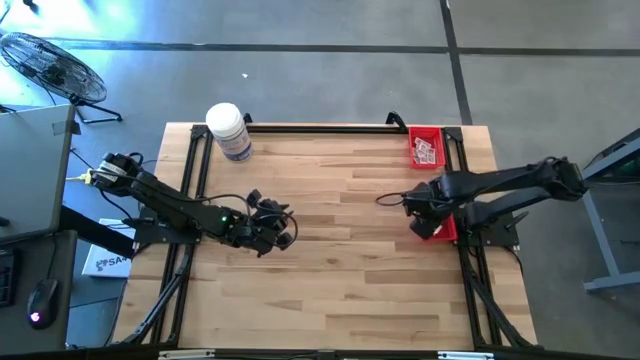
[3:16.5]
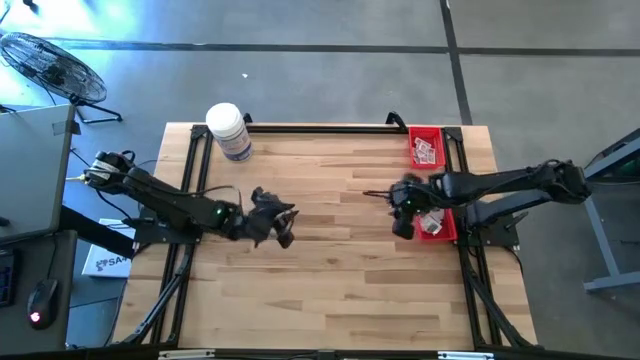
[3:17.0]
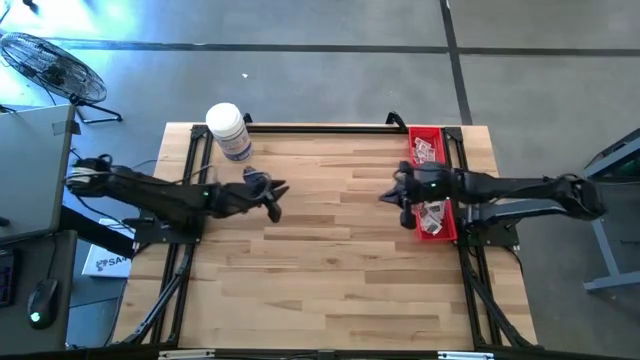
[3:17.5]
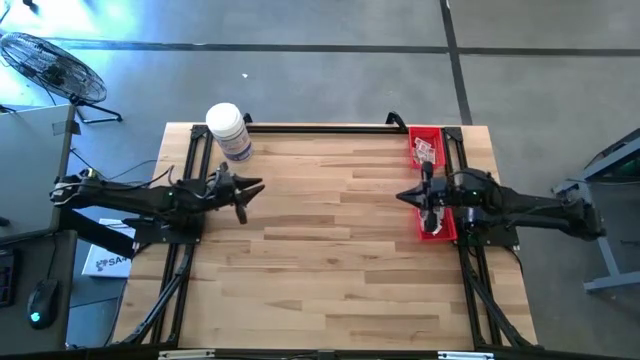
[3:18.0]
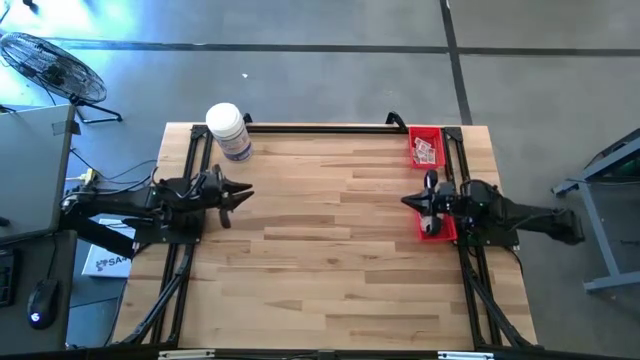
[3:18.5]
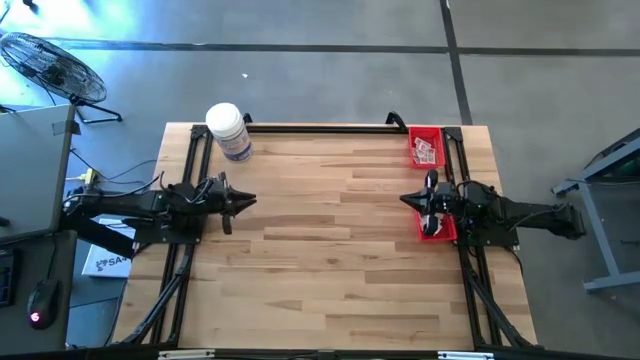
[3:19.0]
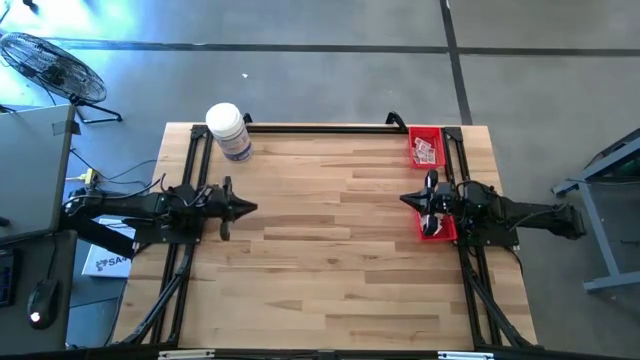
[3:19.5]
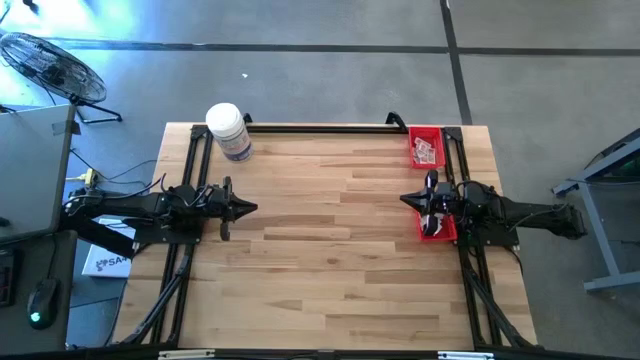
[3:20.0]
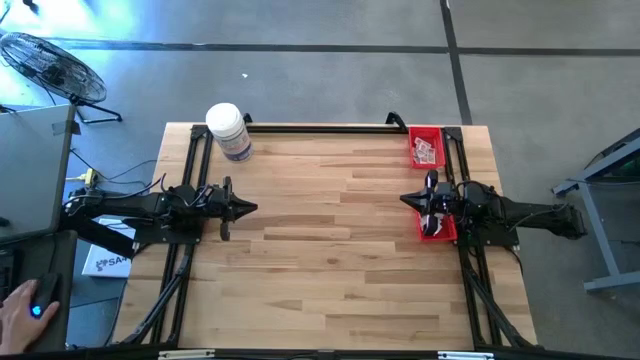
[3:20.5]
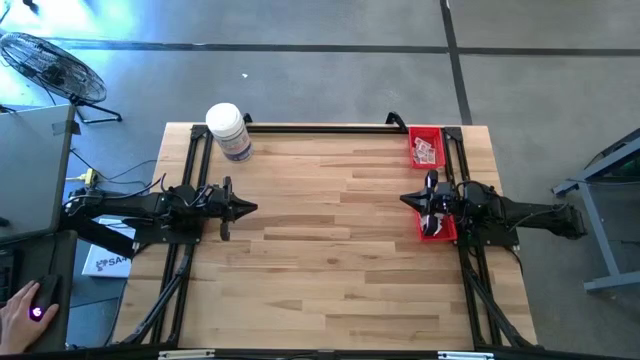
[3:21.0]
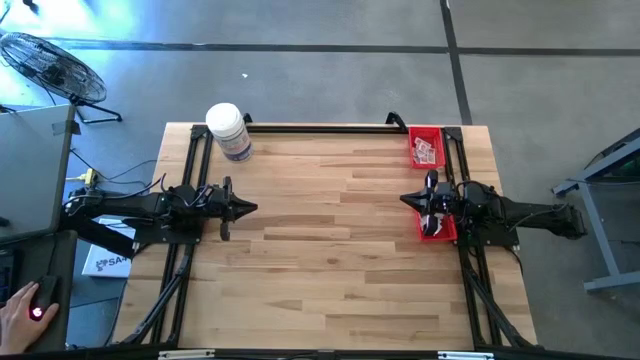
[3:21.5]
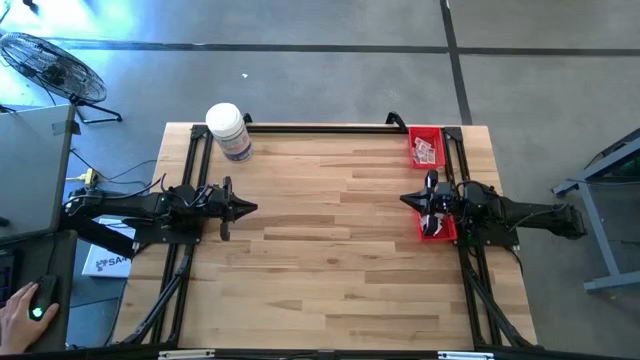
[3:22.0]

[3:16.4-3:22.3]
Task: Pick & Place First Aid Supplies
Return to Home Position

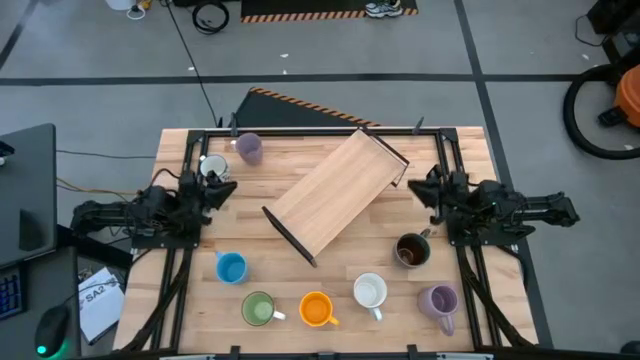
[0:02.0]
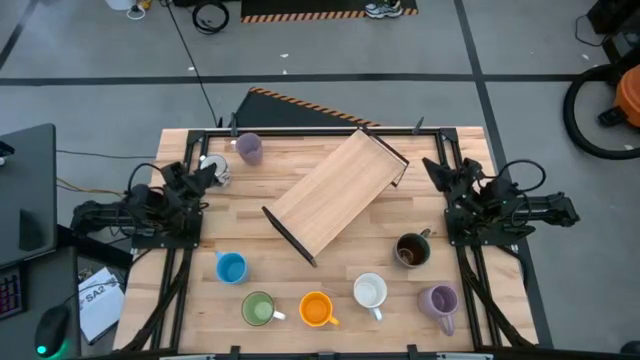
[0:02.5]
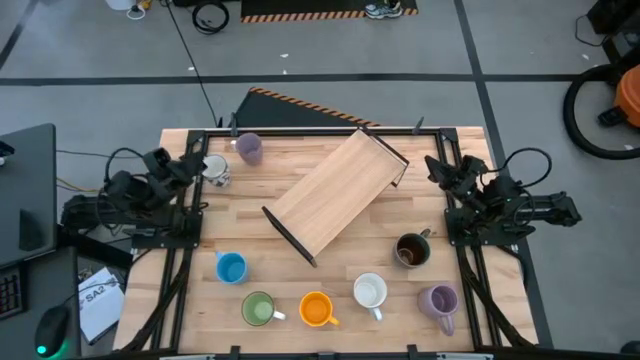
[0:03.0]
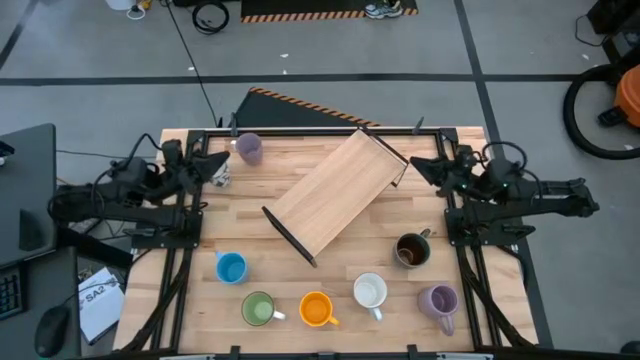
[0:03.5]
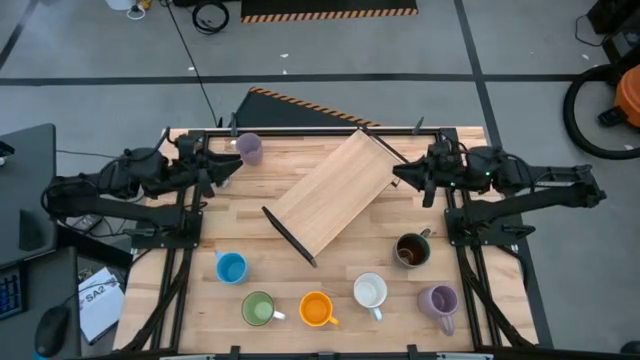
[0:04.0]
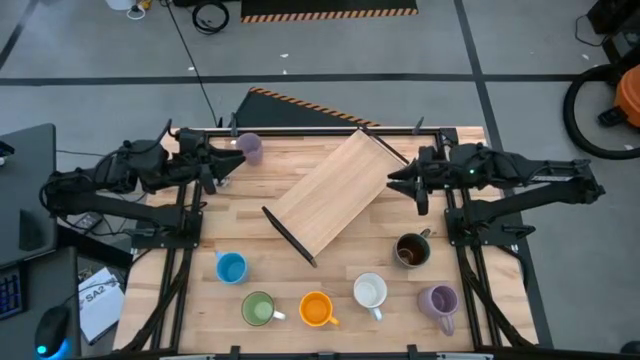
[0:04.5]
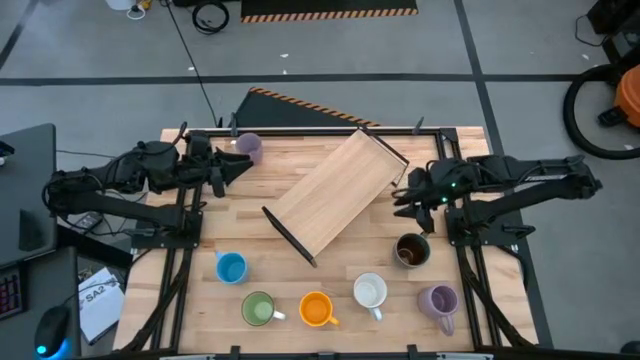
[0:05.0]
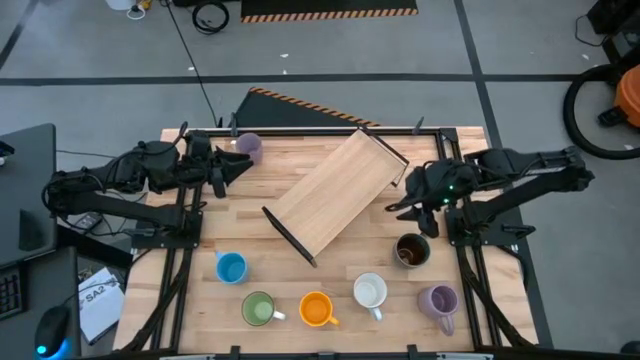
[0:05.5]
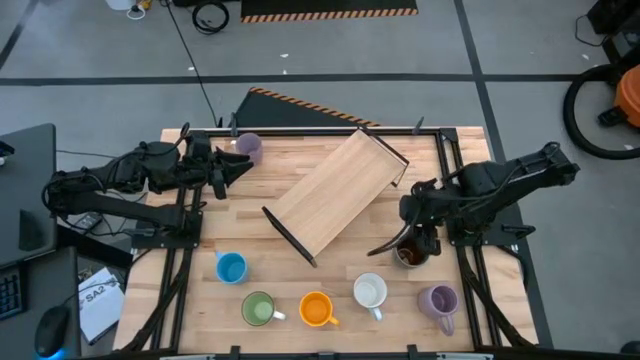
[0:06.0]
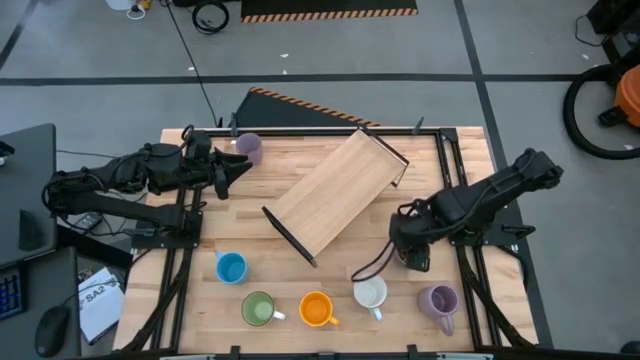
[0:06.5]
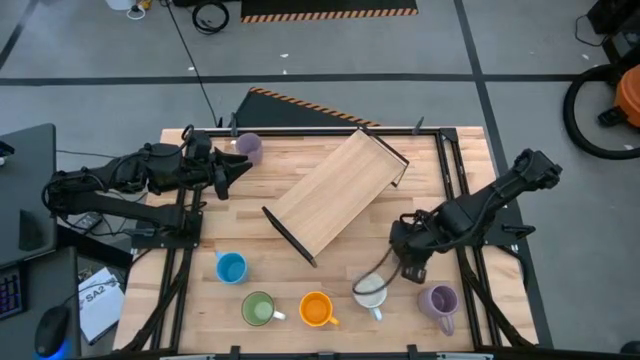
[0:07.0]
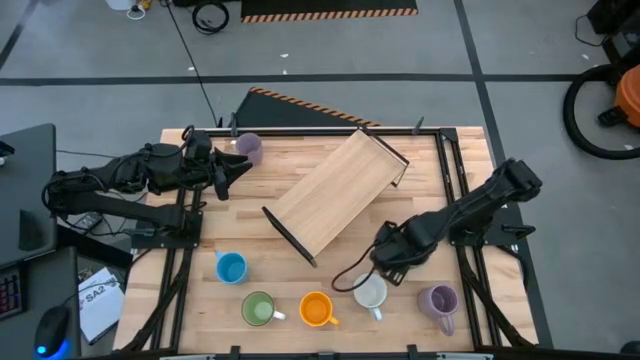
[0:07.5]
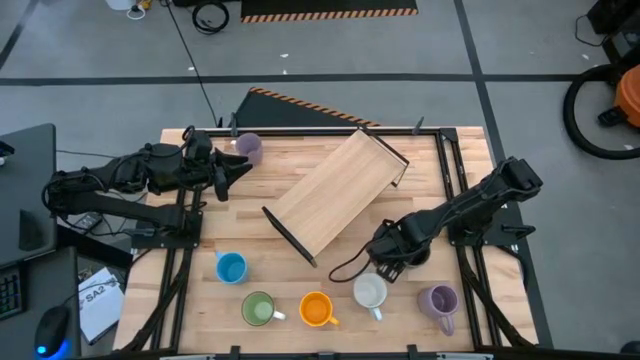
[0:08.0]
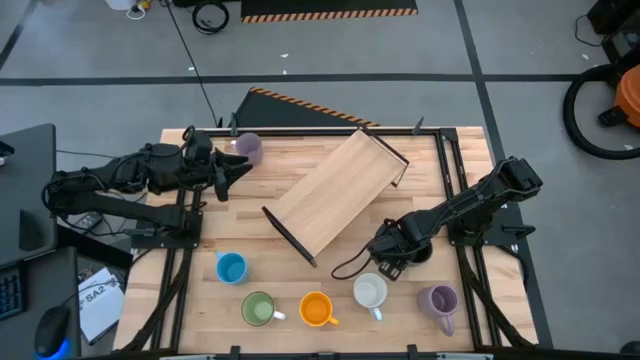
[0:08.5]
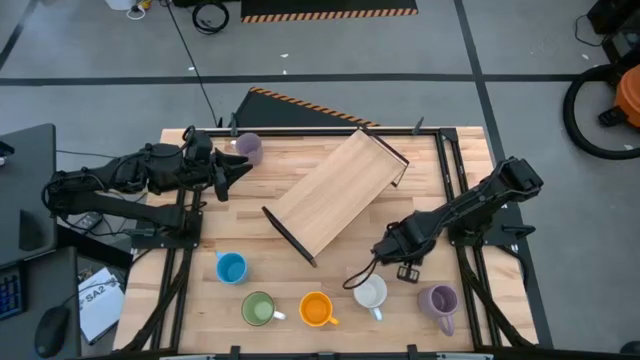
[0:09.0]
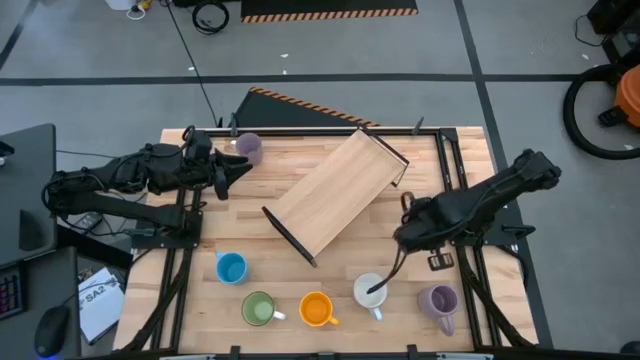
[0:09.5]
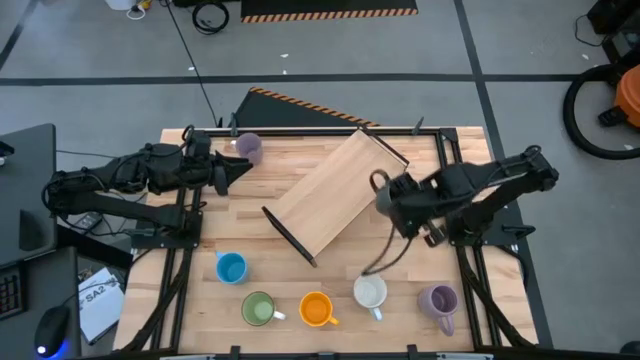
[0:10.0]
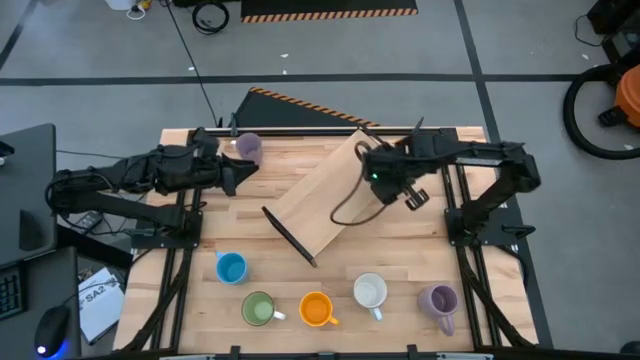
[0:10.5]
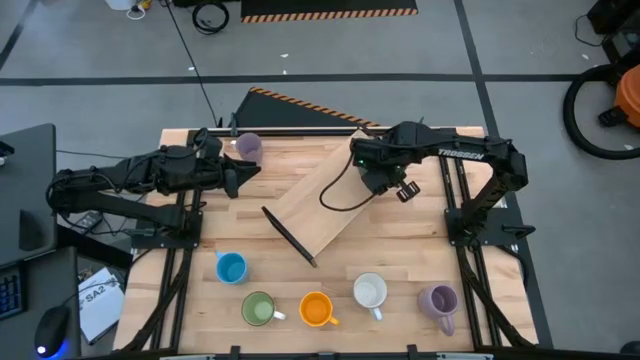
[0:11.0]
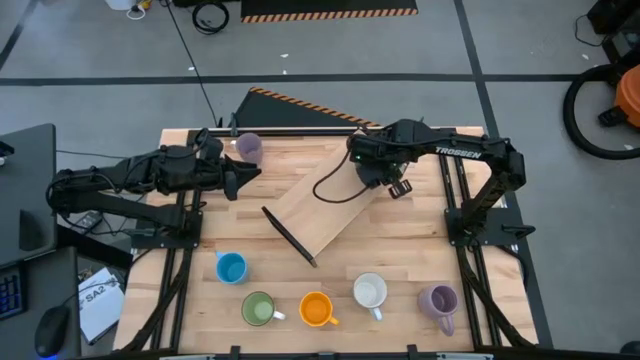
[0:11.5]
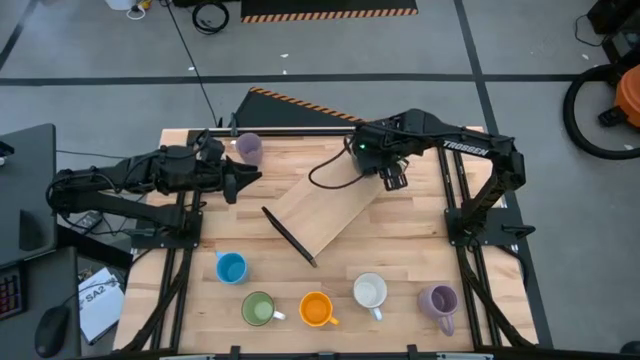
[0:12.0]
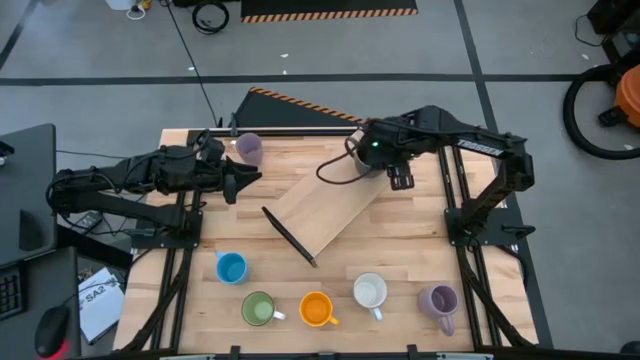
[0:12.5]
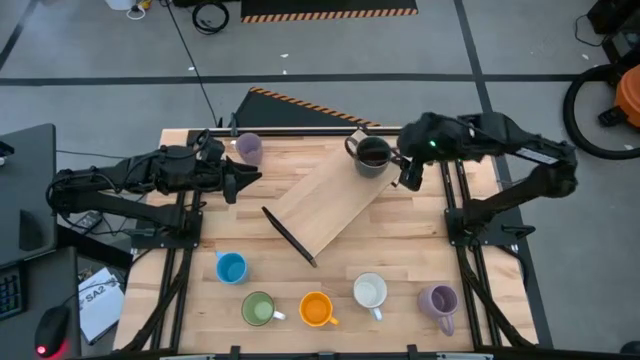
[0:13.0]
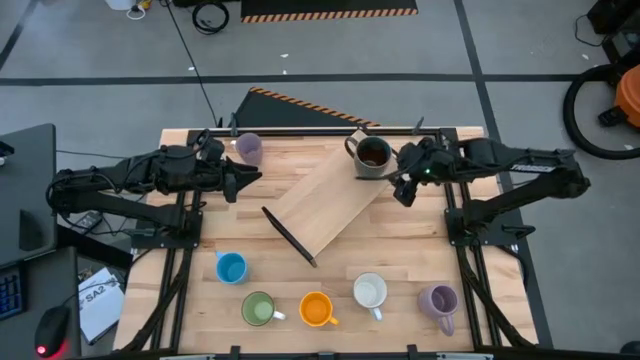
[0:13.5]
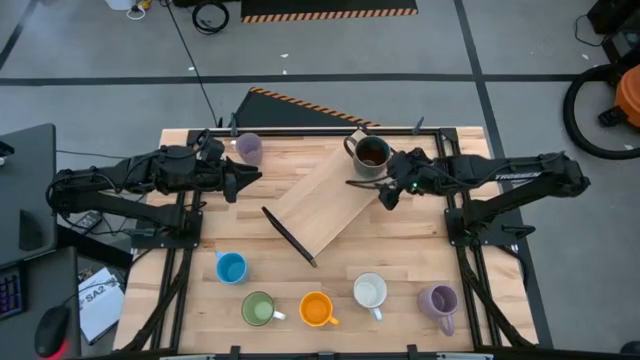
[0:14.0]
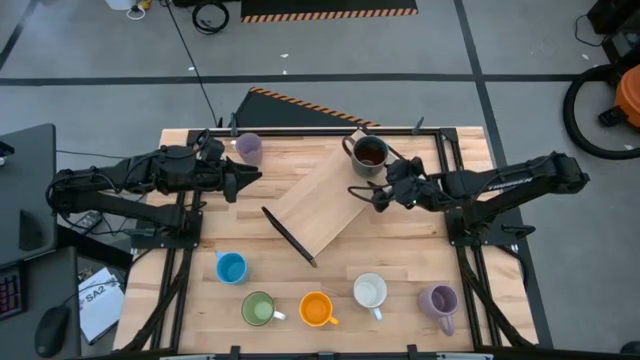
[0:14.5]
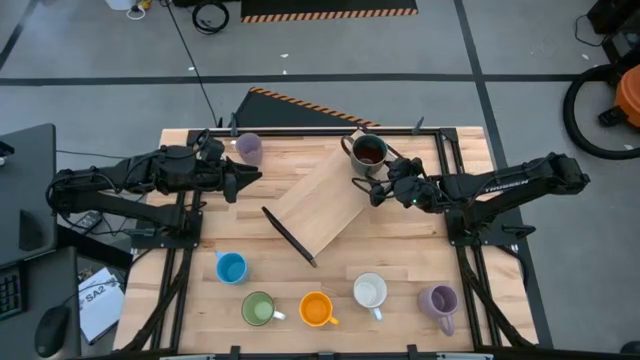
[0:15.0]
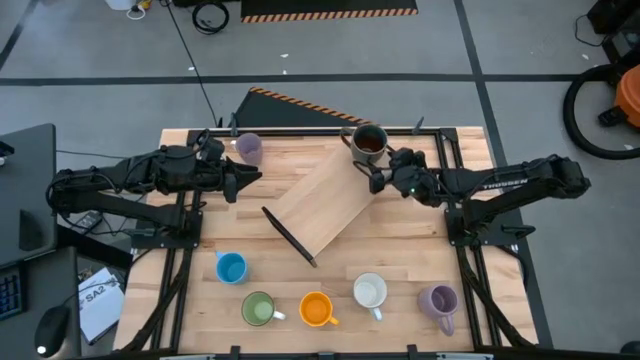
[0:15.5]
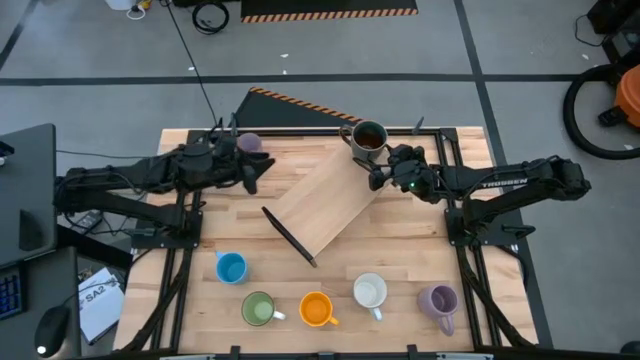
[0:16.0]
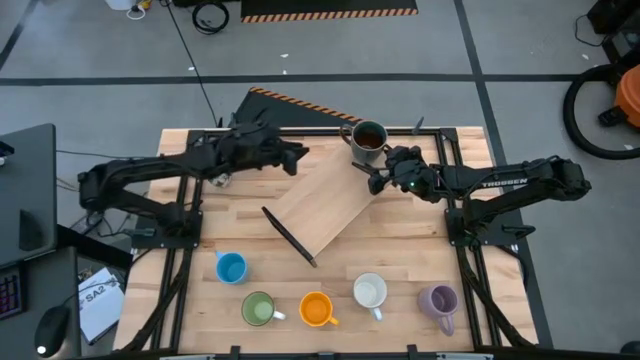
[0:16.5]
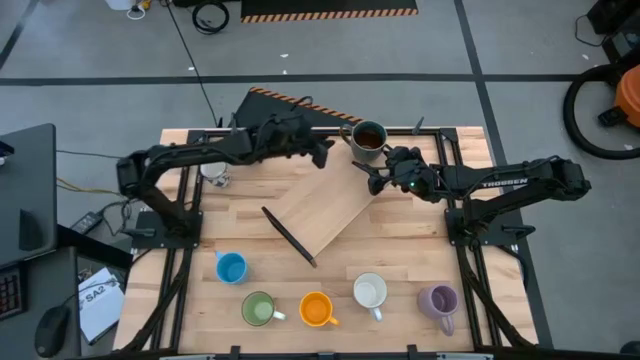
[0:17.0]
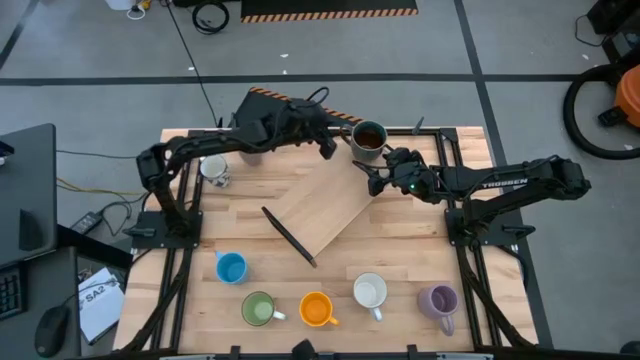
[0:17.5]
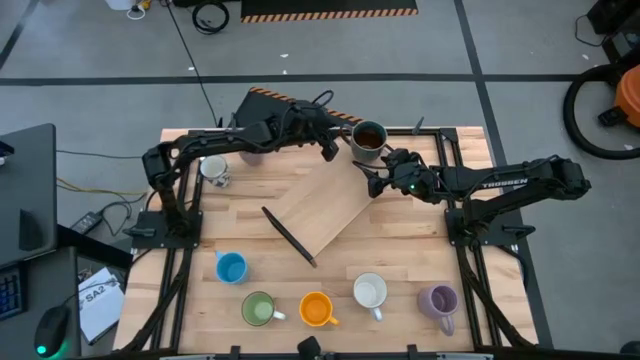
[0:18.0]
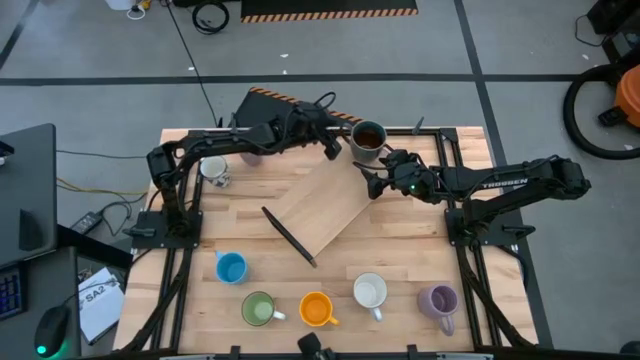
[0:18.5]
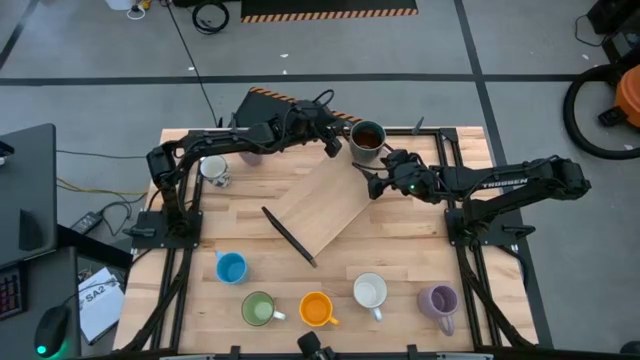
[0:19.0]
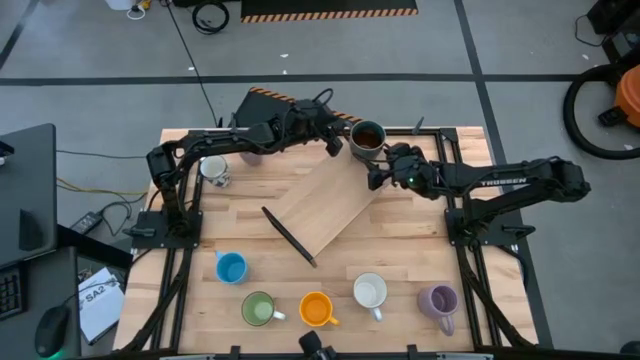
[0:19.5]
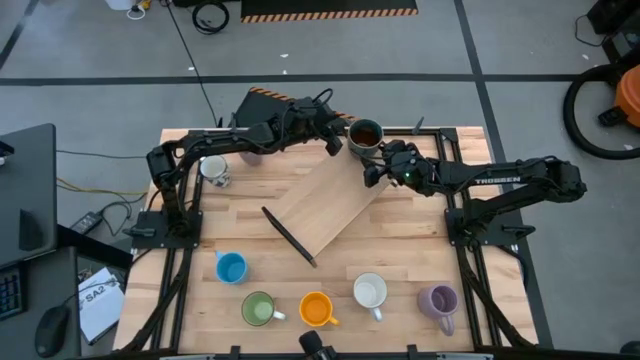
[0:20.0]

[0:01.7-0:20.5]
Task: Place coffee mugs
Put the blue patterned mug on the shelf
